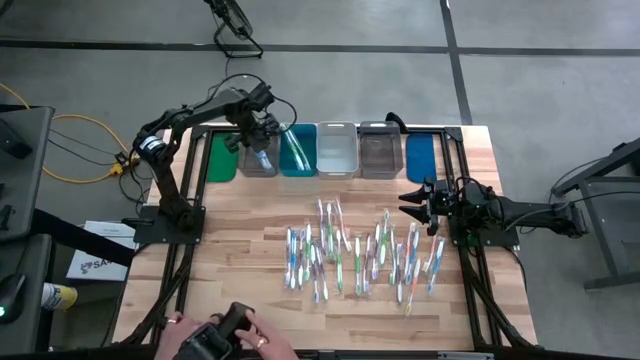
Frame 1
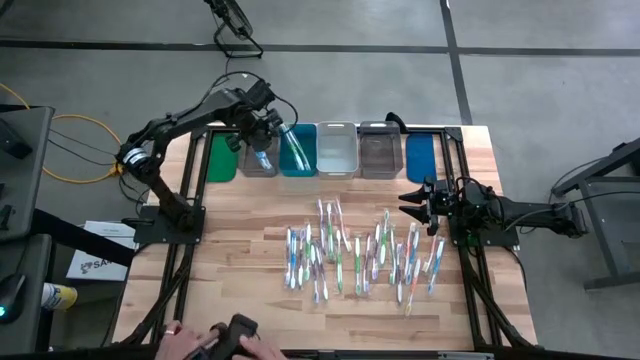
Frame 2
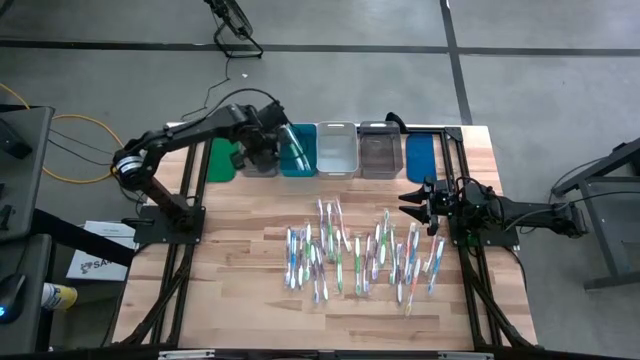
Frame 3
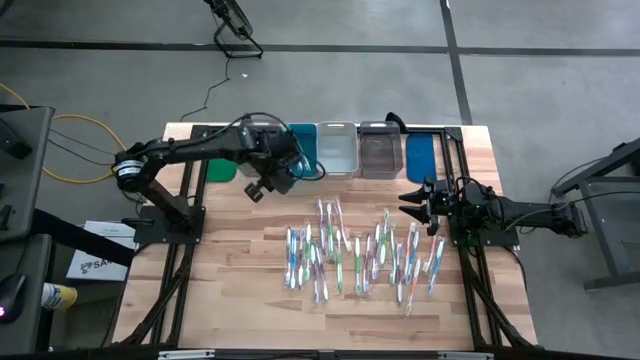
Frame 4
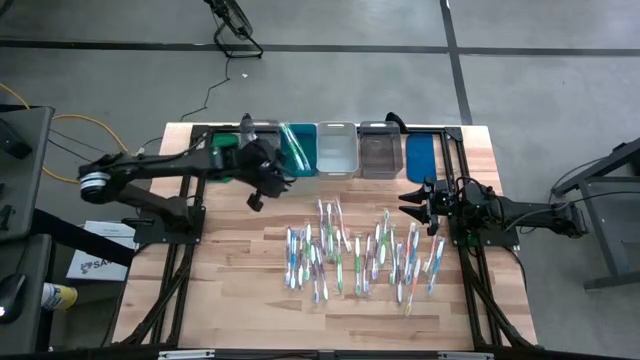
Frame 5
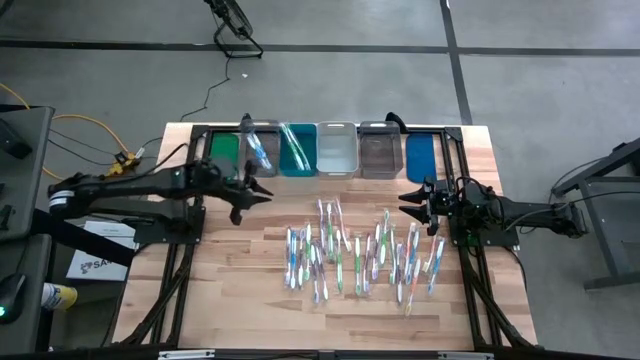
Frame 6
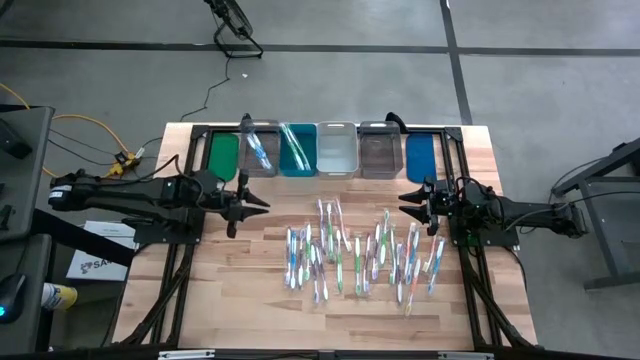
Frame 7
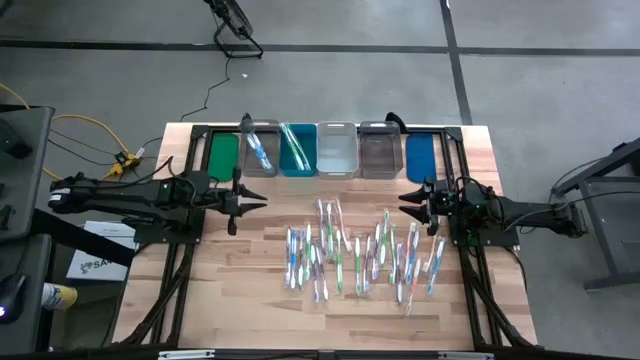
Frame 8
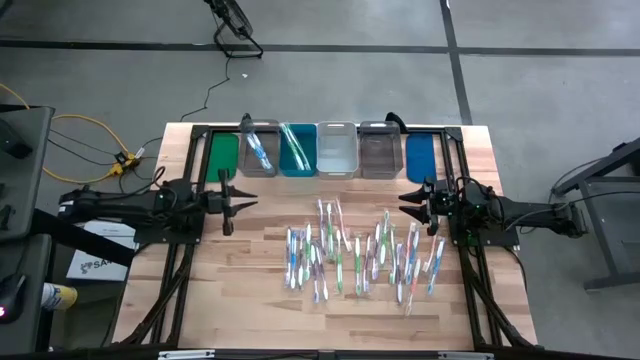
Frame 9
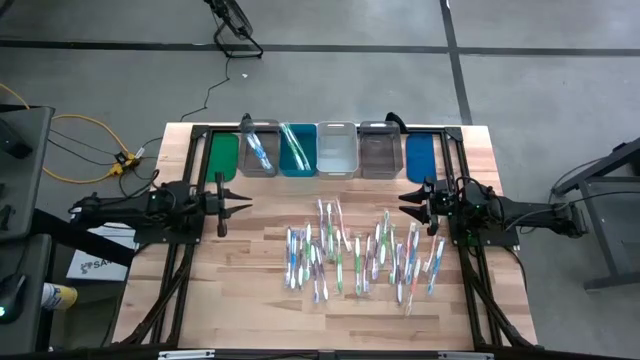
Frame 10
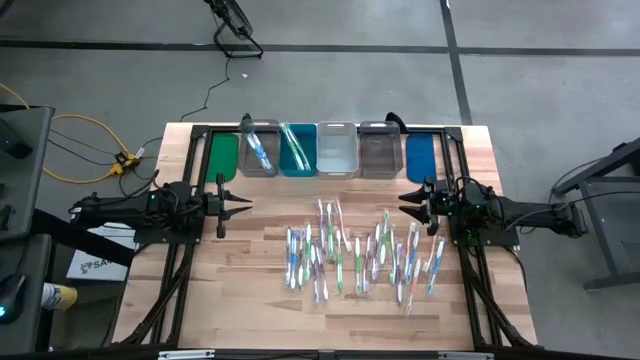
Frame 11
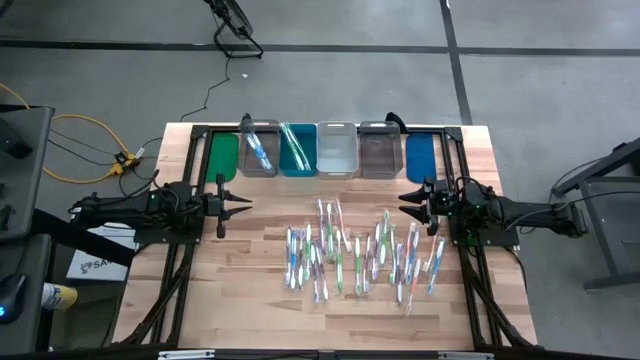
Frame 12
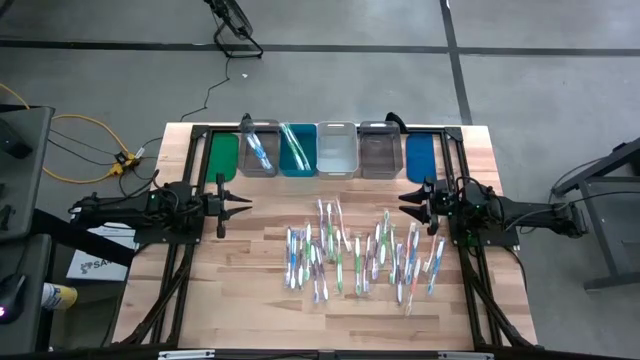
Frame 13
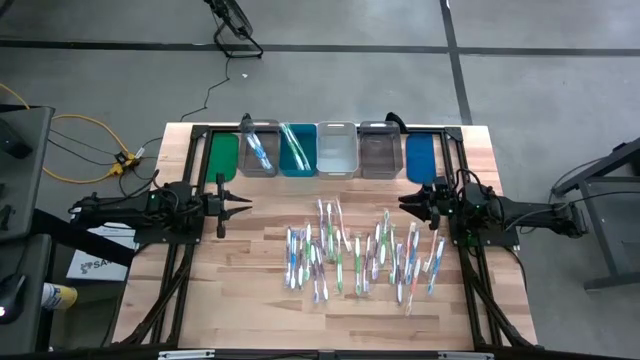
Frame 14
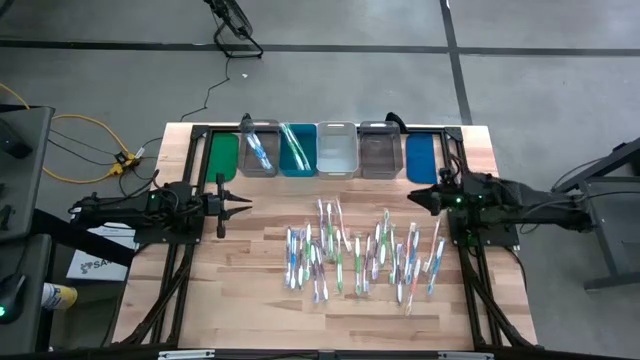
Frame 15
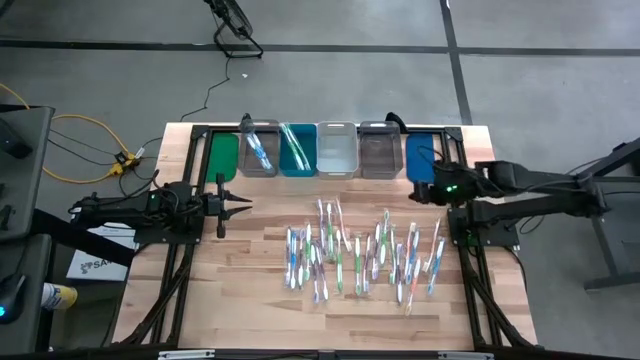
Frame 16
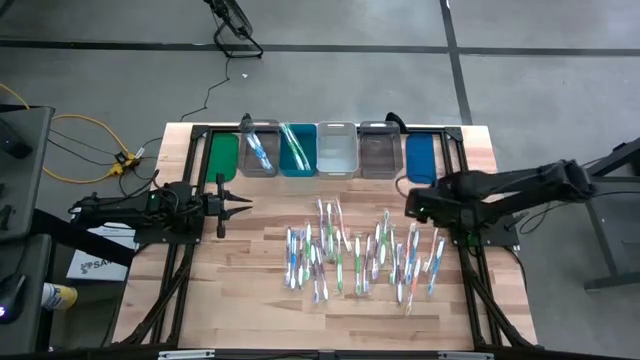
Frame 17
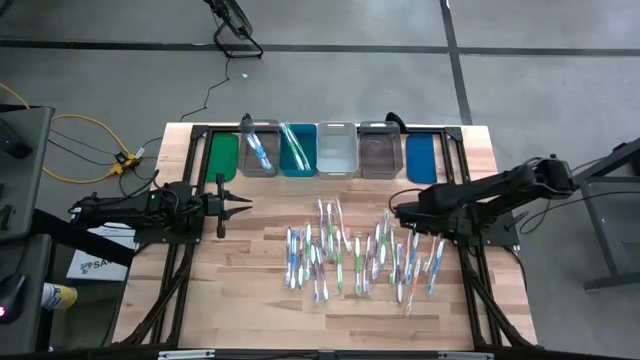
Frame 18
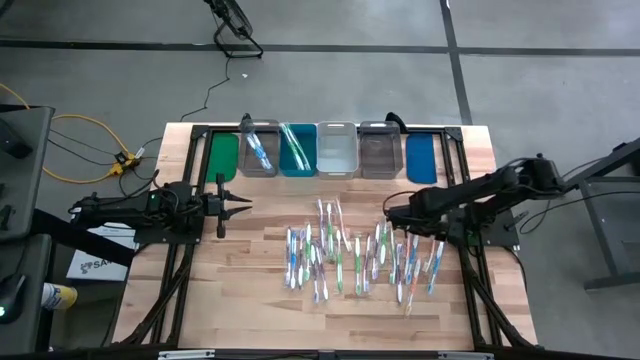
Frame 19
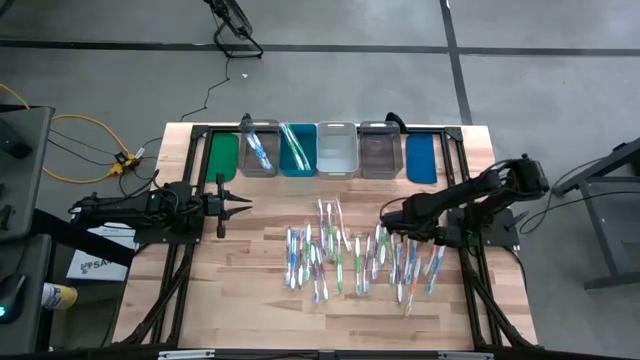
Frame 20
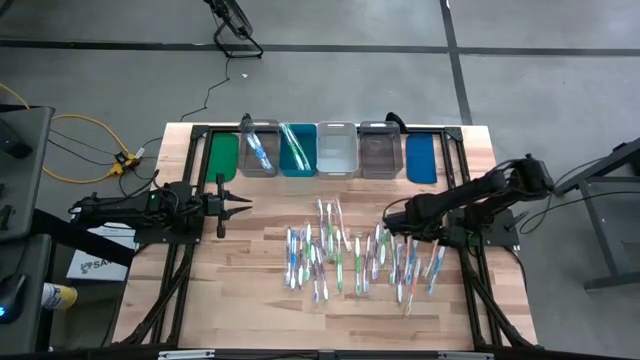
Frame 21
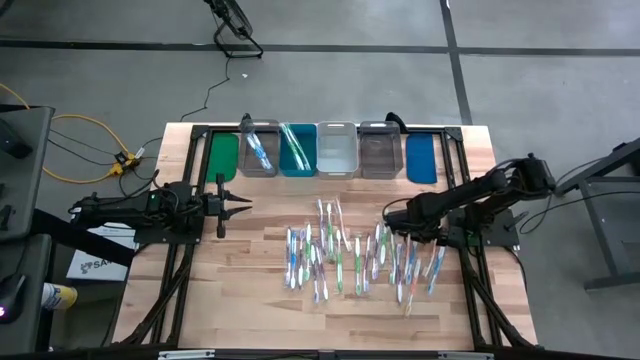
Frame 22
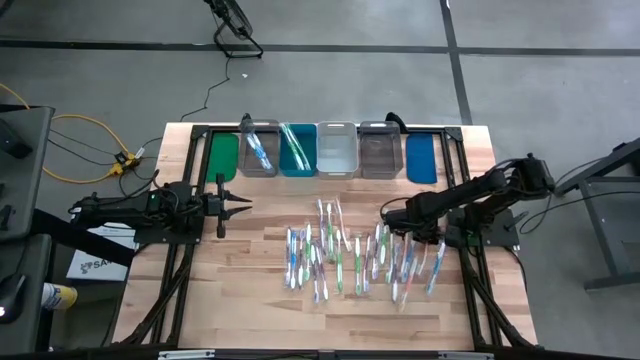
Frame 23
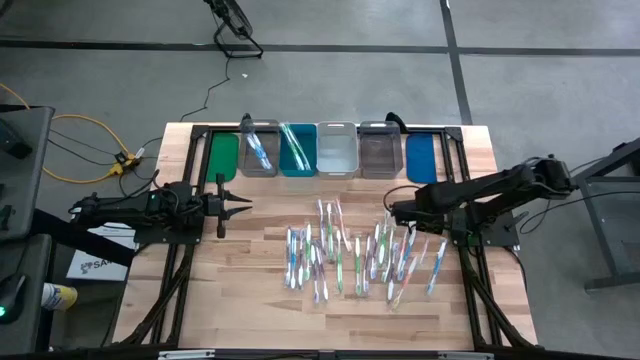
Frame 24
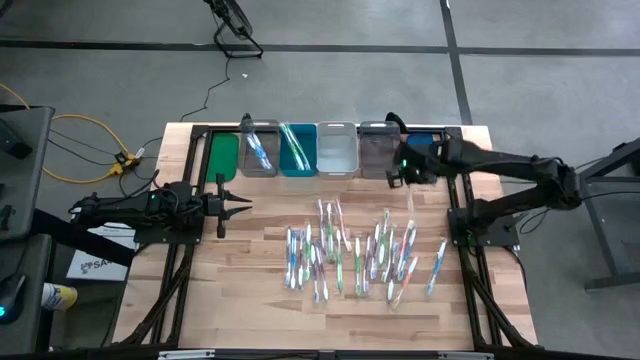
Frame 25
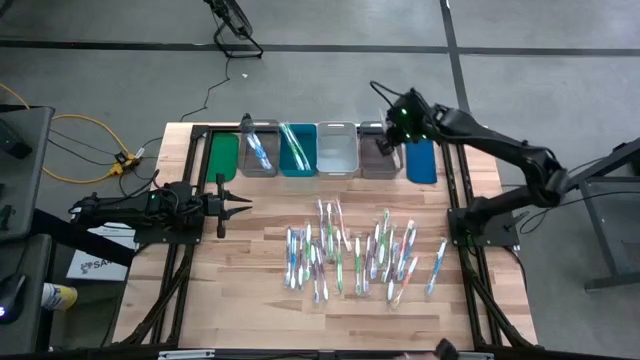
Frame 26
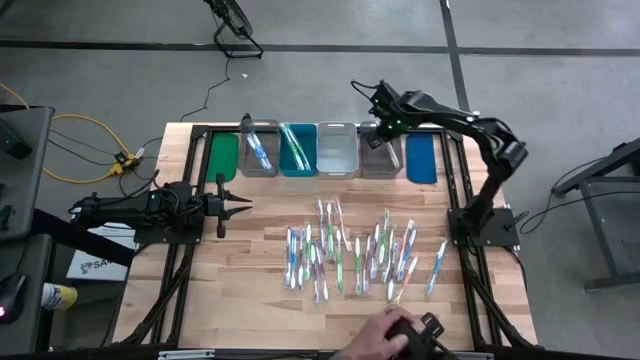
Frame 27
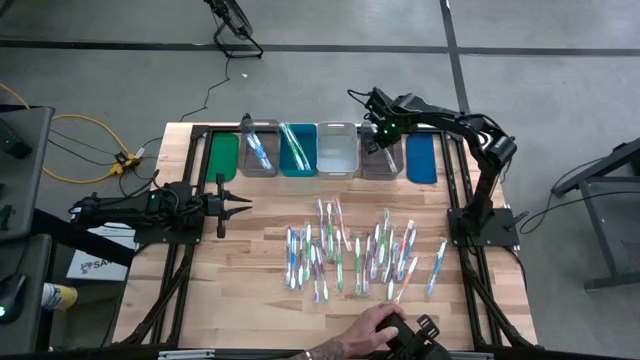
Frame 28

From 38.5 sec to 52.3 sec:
Task: Pick & Place Toothbrushes
Put the orange toothbrush into the right black bin

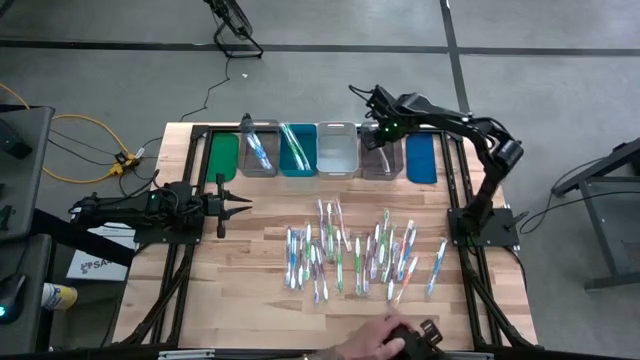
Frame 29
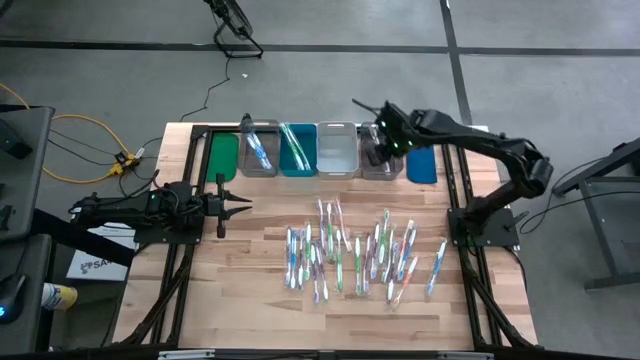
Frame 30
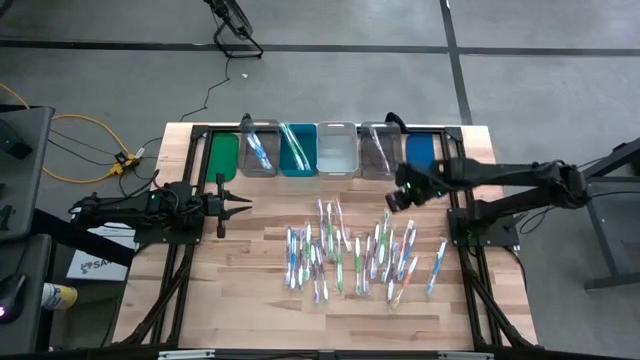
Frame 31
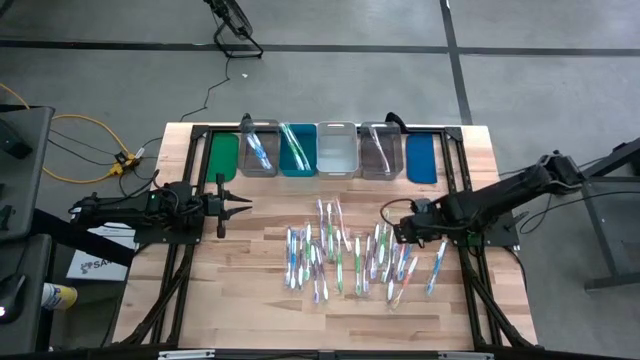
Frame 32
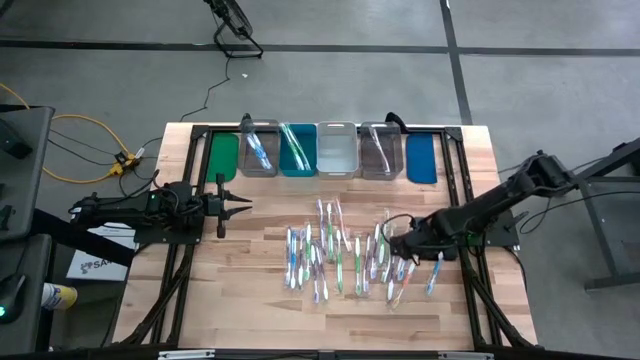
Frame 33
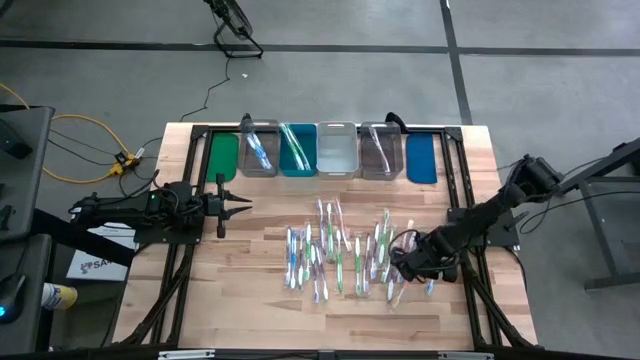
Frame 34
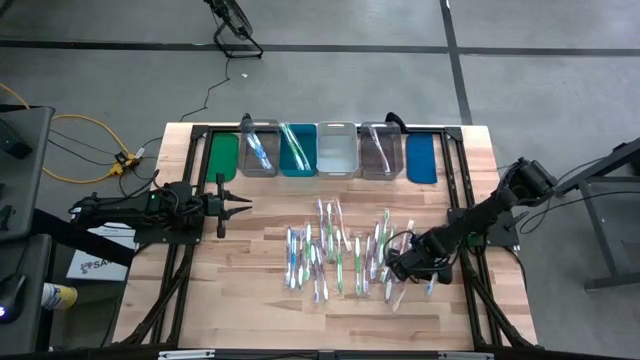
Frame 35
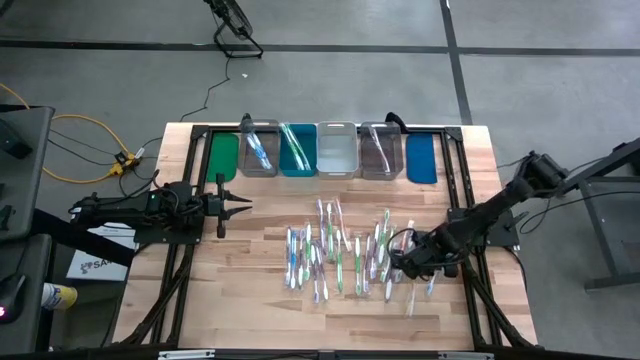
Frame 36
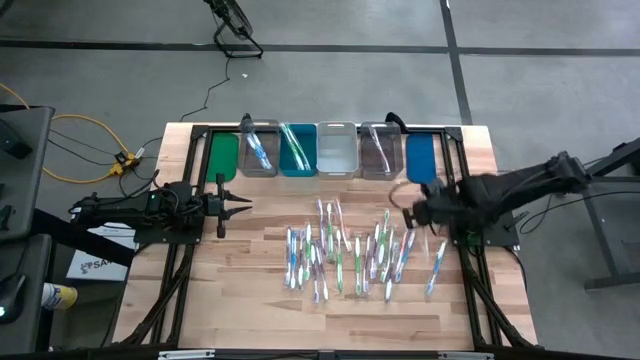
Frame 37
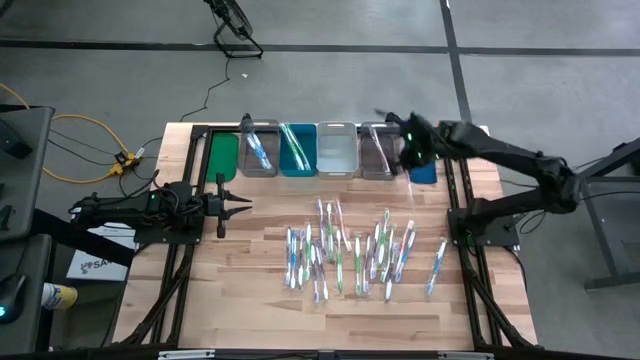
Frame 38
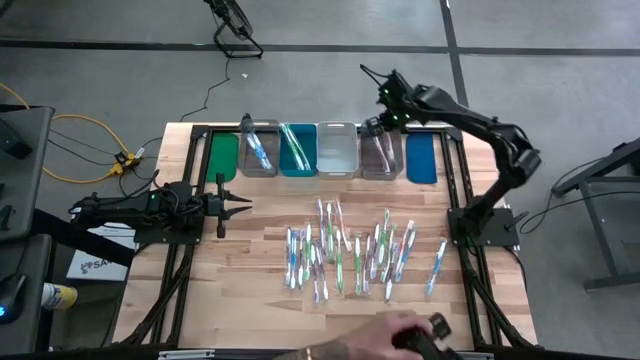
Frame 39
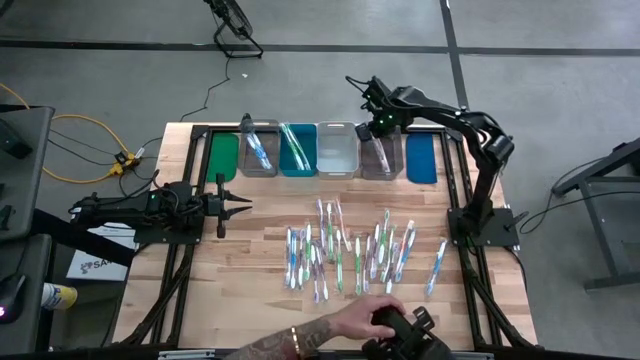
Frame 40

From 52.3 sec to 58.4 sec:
Put the orange toothbrush into the right black bin

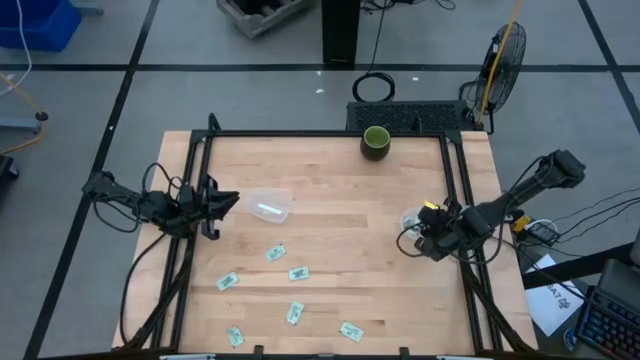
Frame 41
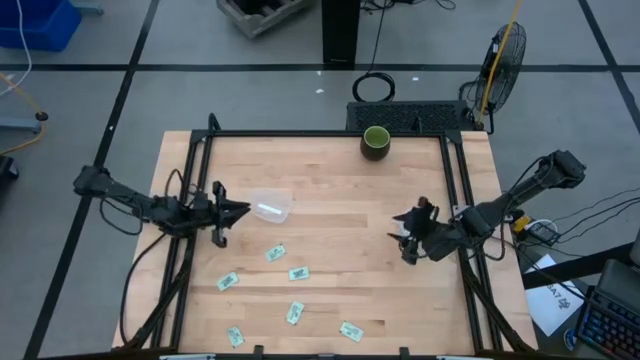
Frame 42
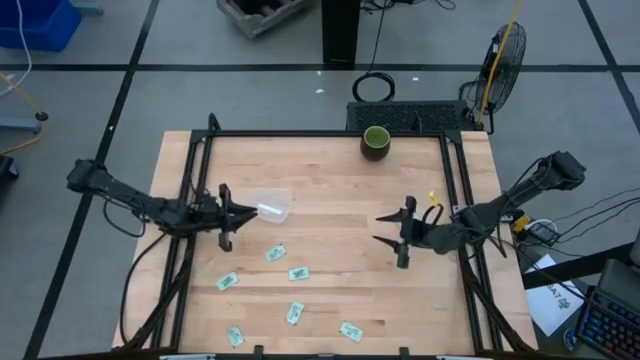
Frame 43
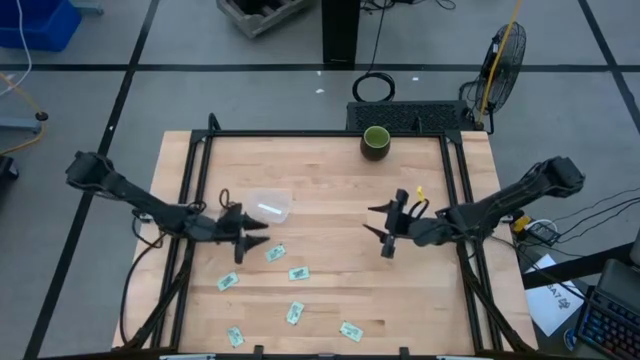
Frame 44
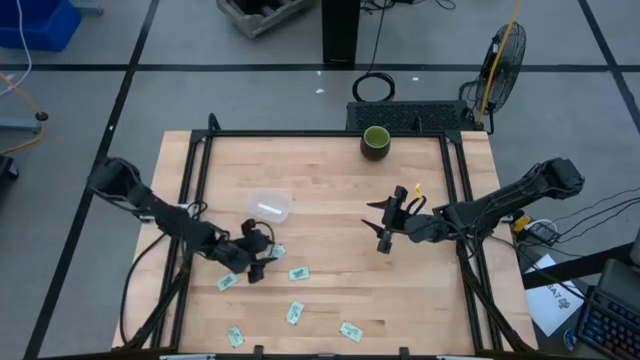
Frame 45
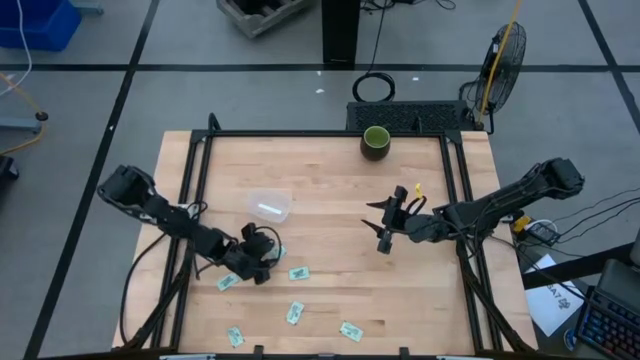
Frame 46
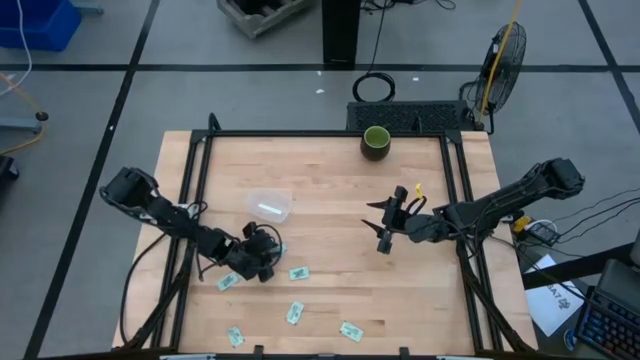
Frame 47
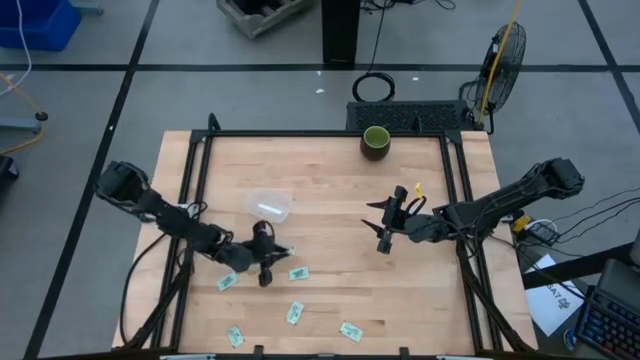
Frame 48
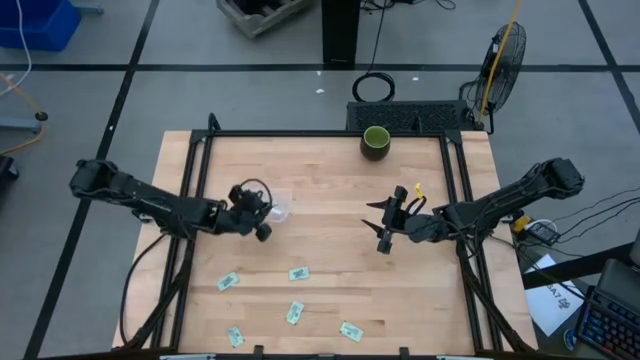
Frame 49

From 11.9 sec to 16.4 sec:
Task: Pick and place Stevia / Truvia into bins
Put the white stevia packet into the transparent rectangular container
